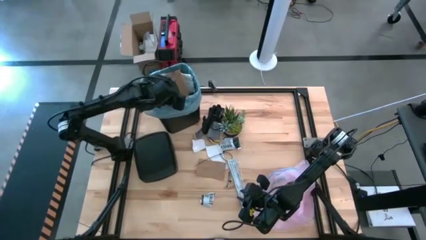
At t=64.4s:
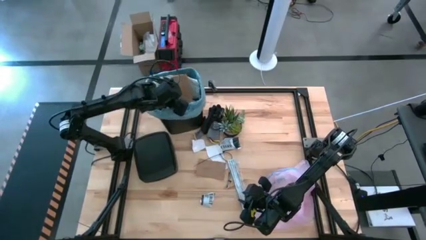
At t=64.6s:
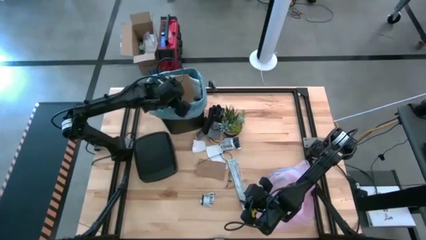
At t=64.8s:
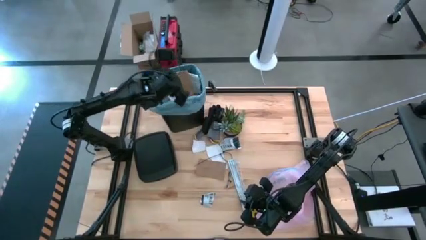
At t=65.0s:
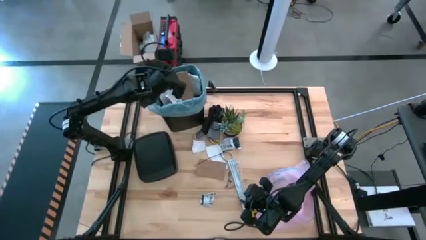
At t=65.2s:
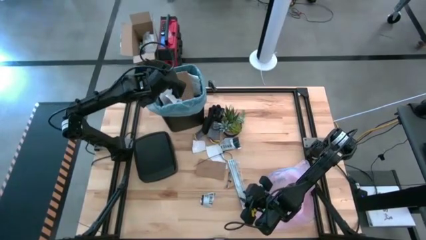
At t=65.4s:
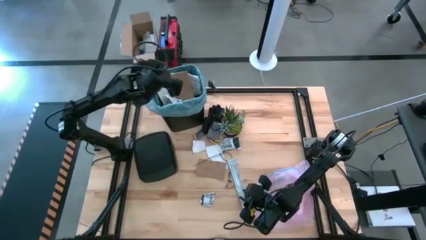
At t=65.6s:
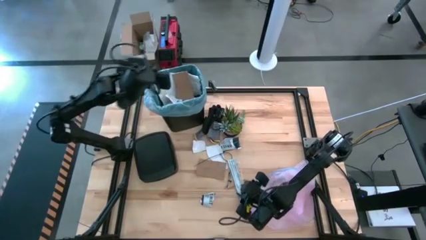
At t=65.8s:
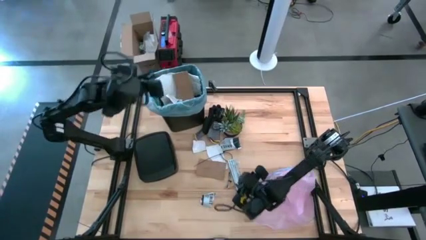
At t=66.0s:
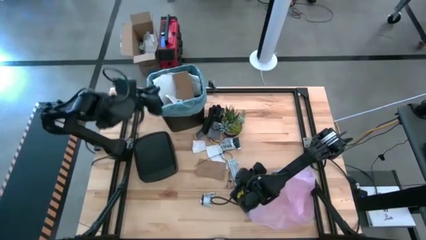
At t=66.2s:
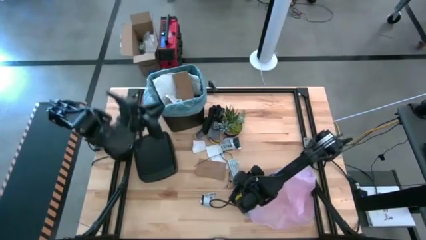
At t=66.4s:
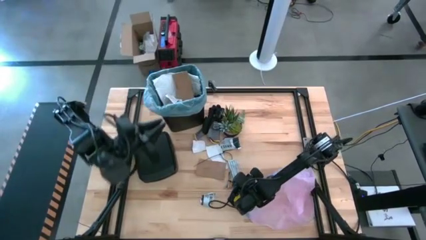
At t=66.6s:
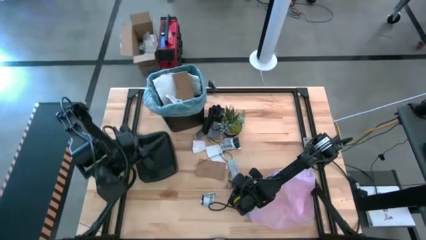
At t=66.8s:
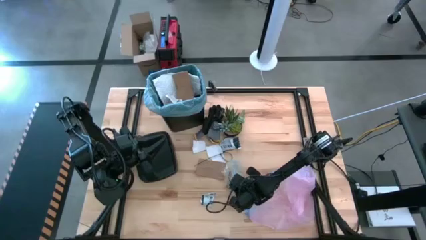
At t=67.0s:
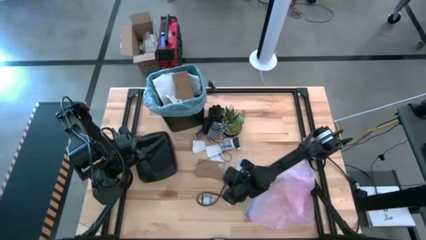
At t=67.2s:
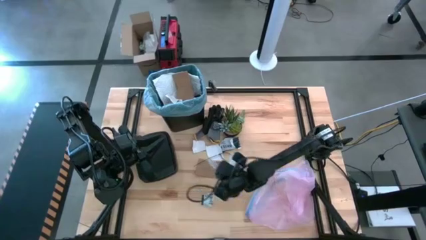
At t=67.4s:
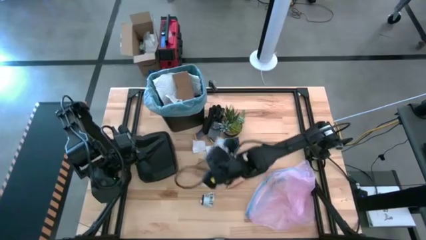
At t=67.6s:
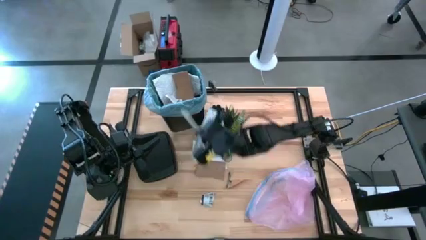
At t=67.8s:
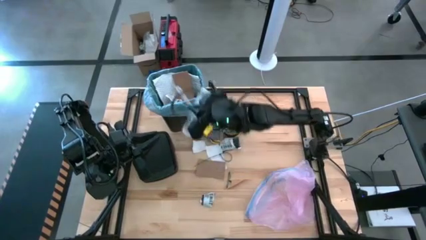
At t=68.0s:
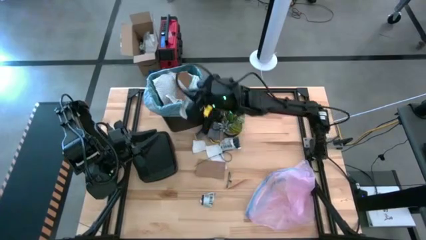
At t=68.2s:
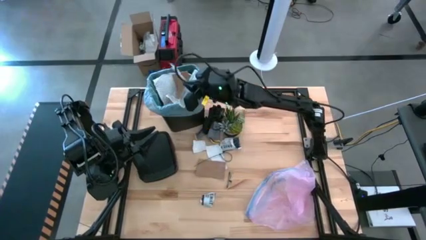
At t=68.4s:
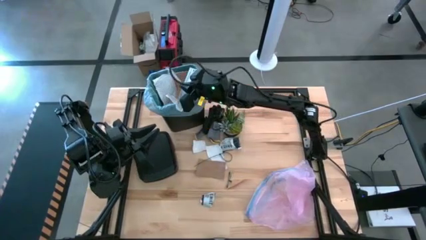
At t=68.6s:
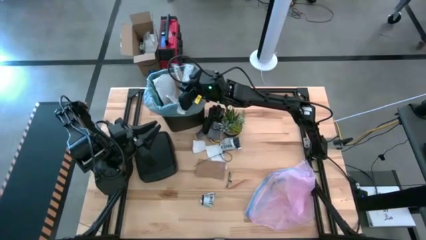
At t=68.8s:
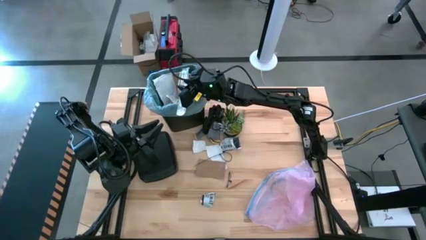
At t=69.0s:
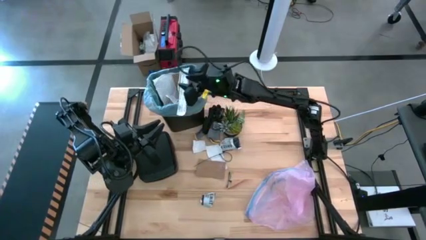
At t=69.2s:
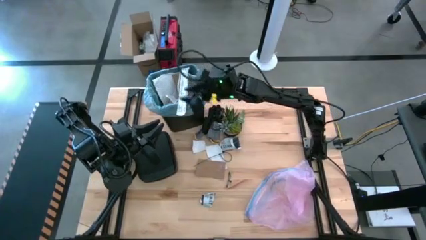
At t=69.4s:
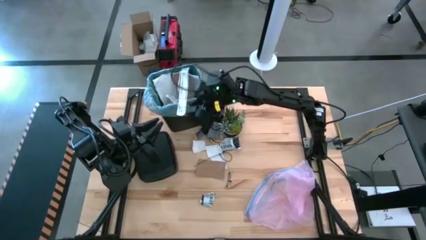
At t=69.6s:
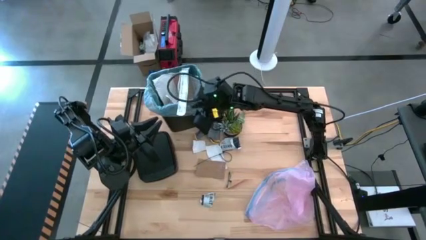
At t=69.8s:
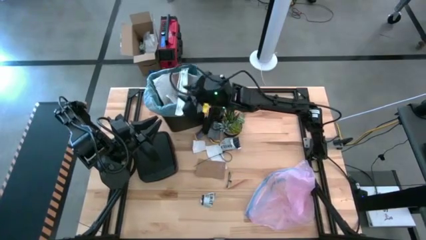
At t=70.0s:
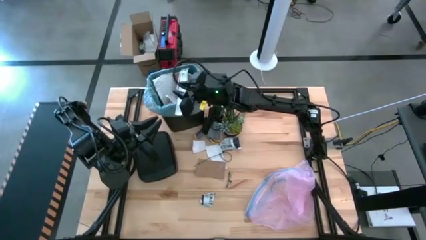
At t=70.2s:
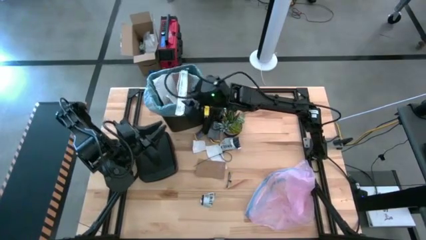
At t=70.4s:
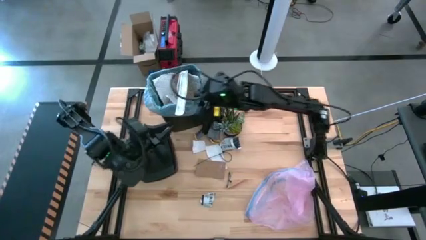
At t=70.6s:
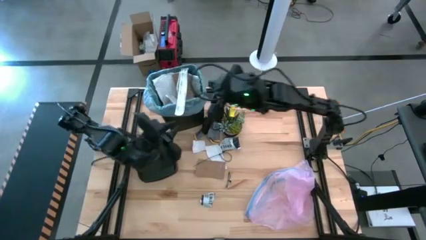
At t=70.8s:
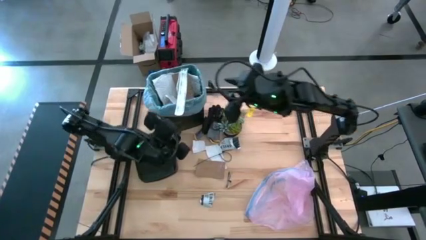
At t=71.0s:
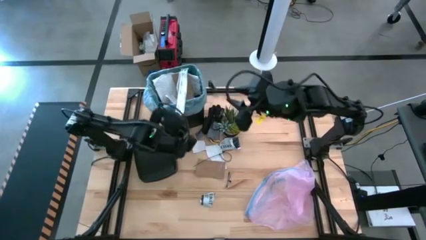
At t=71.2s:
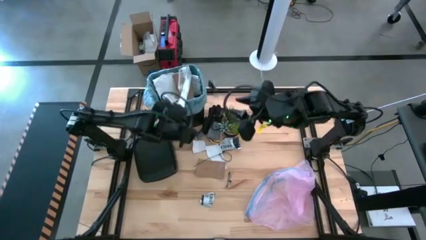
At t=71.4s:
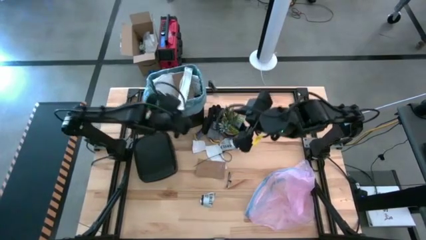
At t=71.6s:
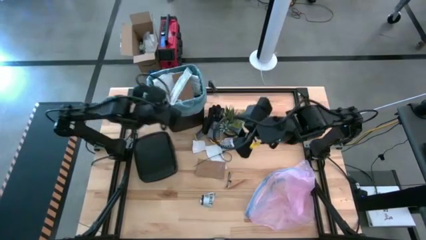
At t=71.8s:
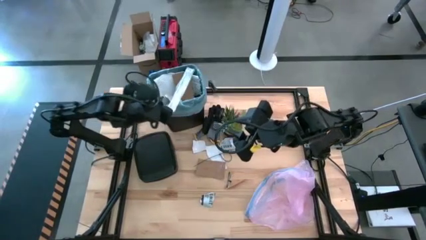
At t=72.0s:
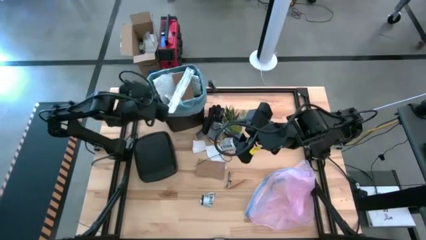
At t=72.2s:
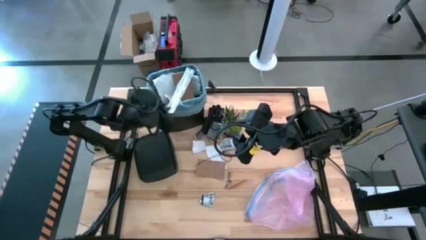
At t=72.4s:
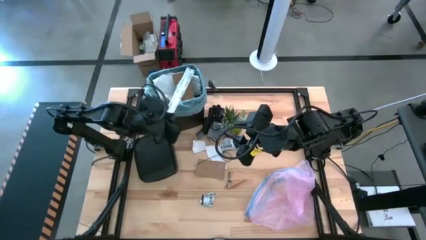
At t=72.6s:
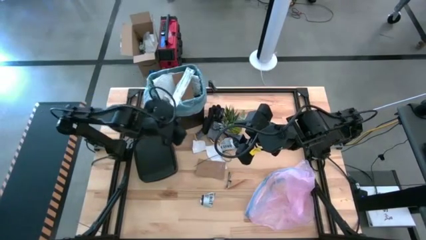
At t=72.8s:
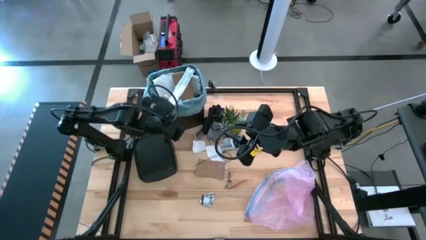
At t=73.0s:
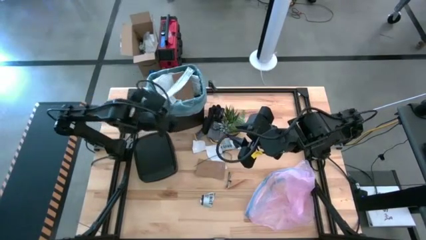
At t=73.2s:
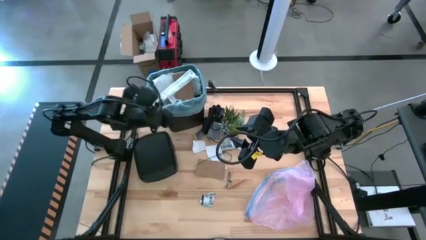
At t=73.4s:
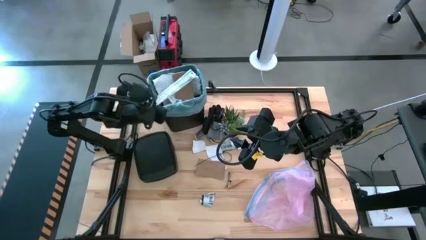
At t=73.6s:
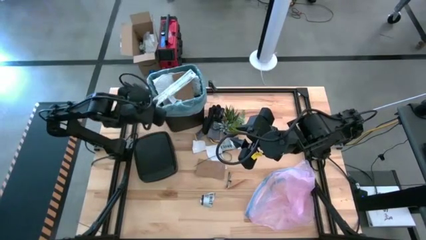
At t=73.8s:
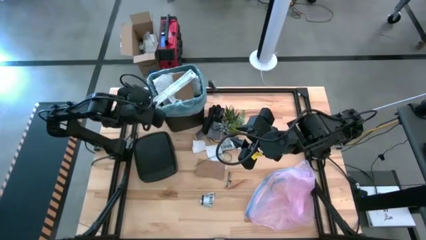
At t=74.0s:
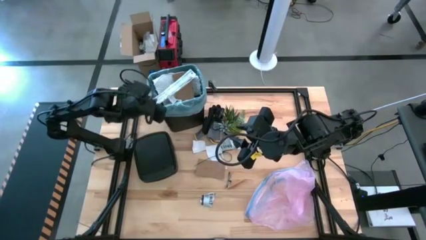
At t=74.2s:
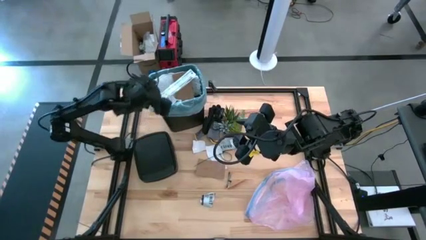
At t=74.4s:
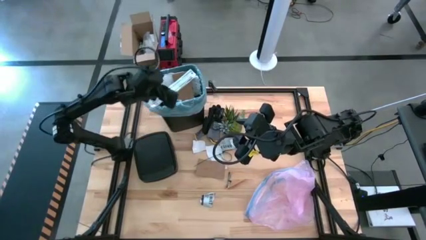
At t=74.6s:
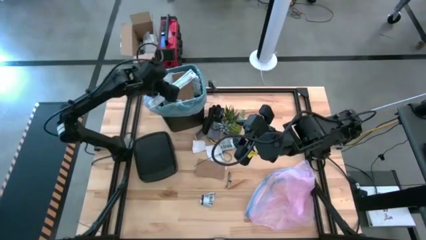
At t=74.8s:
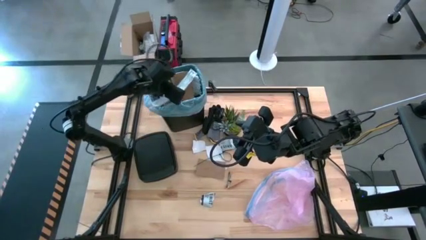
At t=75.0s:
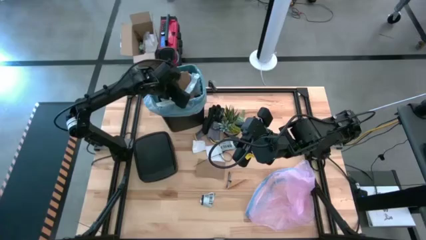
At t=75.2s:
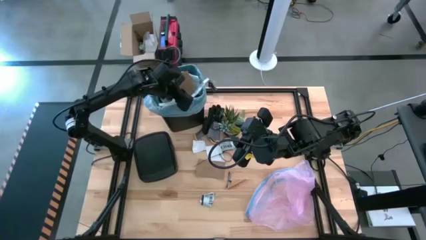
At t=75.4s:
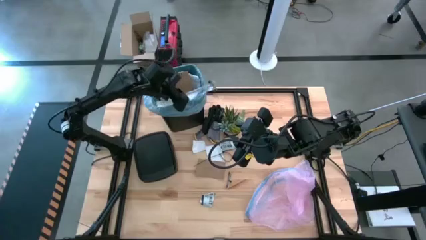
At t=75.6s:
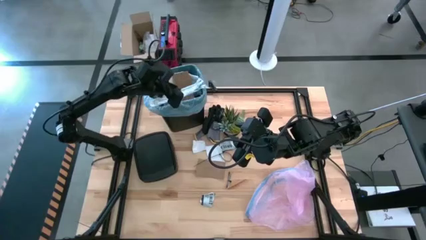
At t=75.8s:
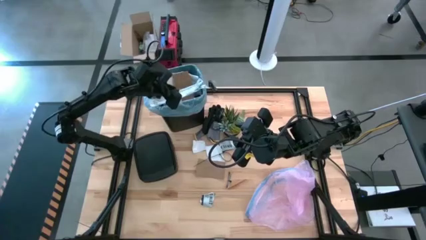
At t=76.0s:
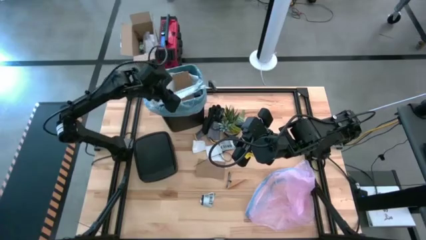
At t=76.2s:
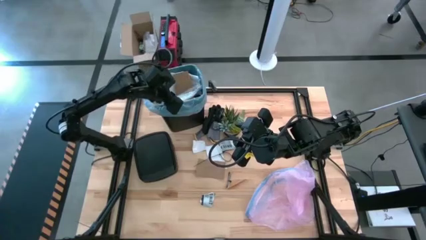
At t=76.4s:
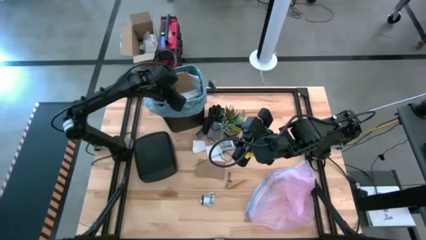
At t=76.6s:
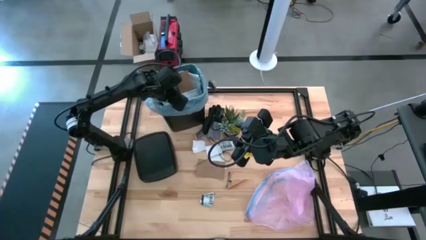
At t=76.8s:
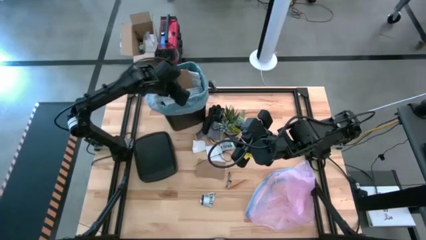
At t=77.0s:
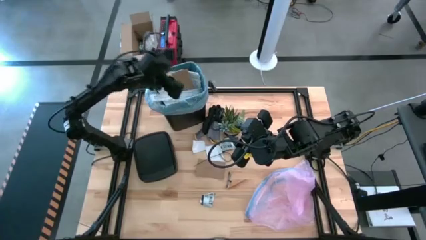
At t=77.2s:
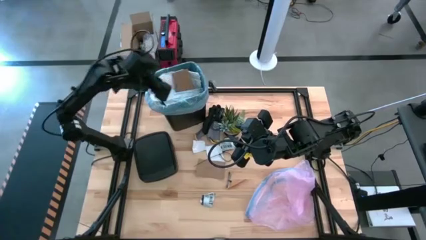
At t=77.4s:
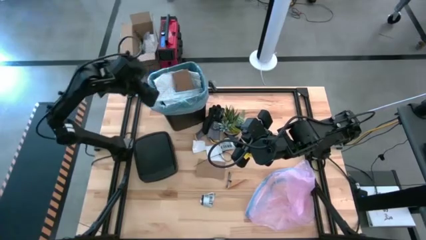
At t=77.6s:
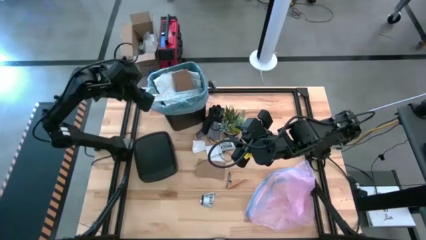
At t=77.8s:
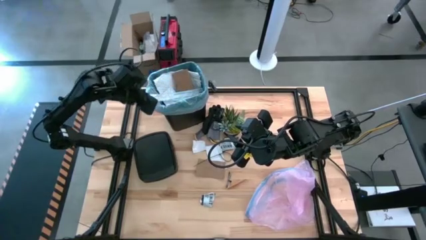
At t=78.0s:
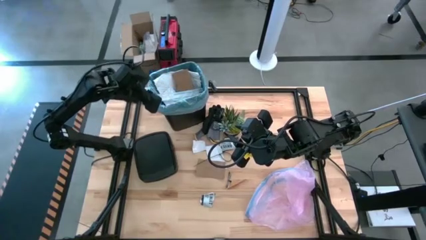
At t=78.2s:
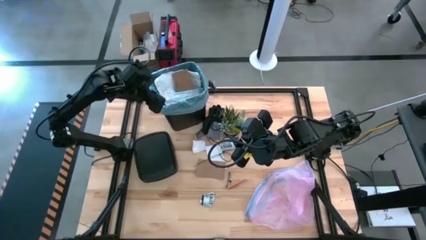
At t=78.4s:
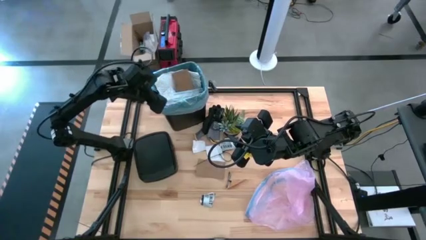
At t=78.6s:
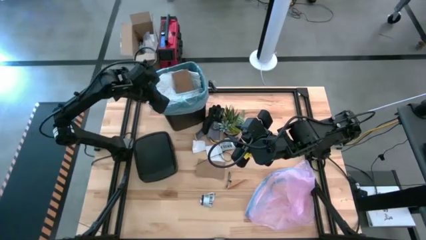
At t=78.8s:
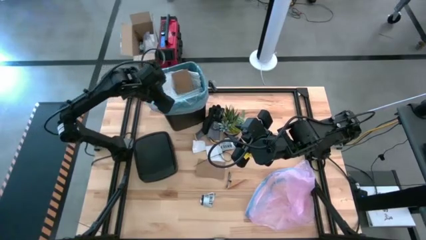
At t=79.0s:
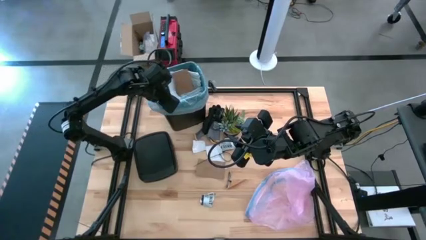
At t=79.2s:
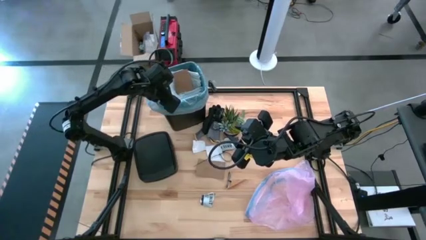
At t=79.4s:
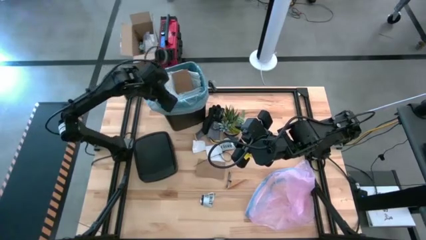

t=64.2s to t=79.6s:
Task: place trash/remove bag and relplace
Put the white plastic into the trash bin

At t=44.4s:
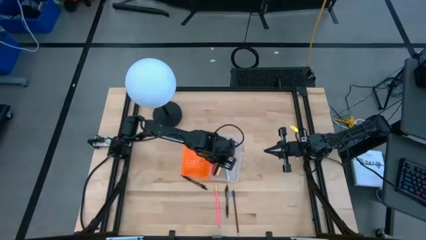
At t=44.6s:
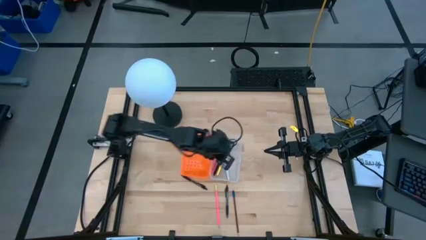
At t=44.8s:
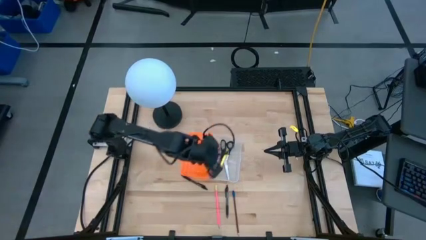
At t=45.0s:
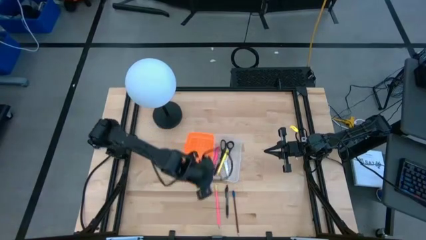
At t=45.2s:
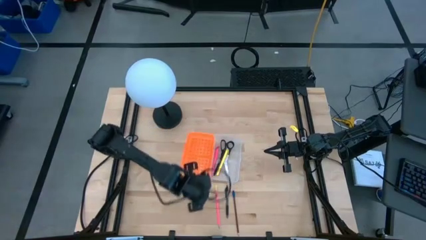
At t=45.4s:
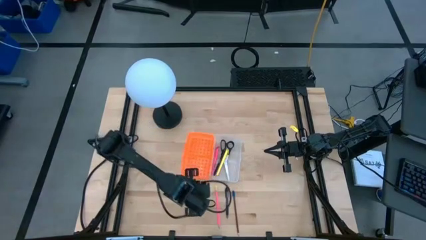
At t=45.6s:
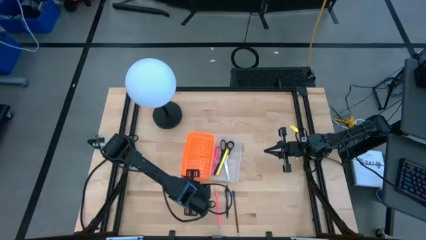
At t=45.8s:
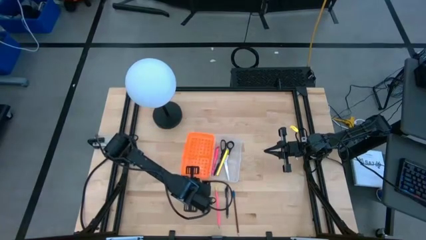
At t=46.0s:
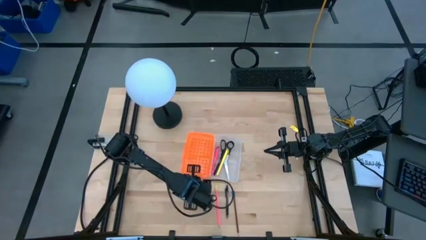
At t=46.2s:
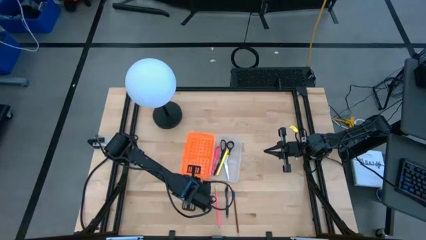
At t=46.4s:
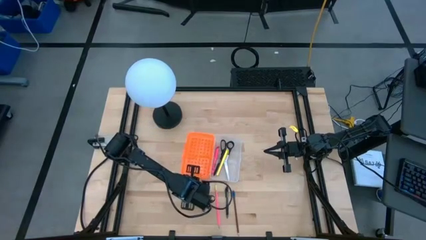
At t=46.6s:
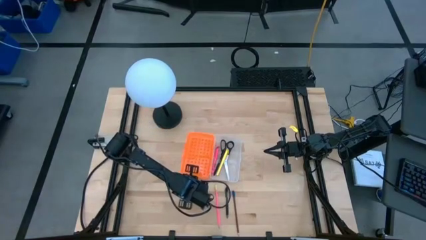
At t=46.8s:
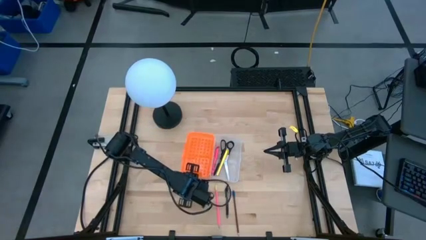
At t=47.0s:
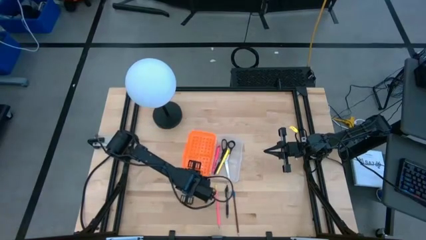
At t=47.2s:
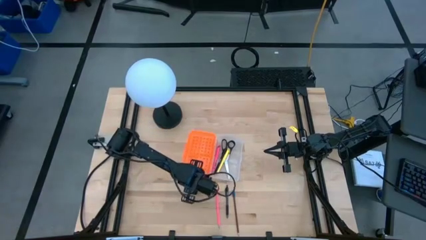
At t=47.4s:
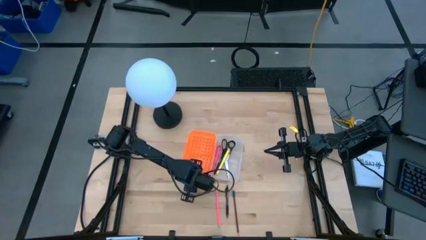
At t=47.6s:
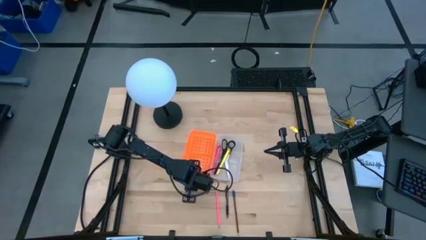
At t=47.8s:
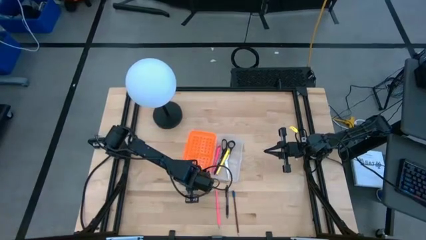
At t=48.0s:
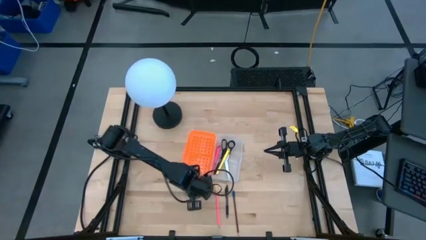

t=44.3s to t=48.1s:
Task: Pick & place school supplies into a supply box
Put the top transparent pen into the orange supply box
